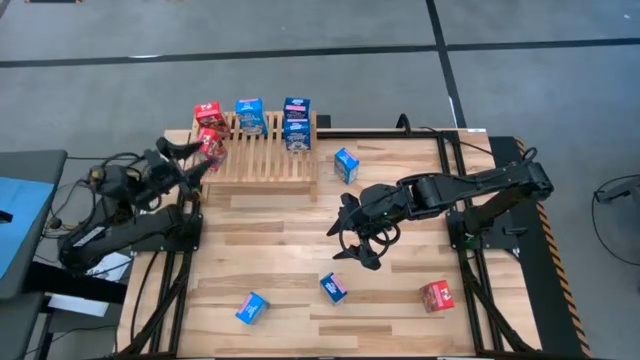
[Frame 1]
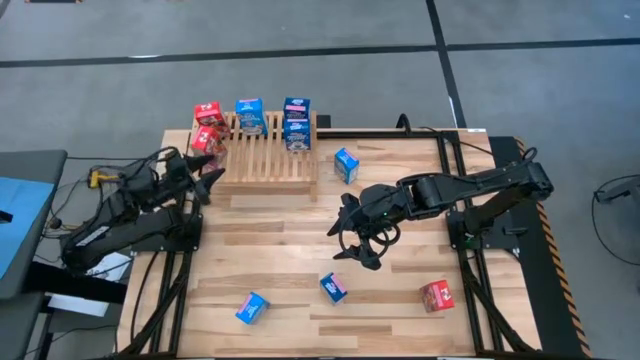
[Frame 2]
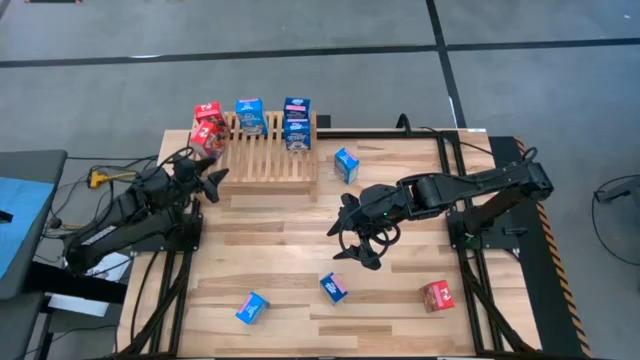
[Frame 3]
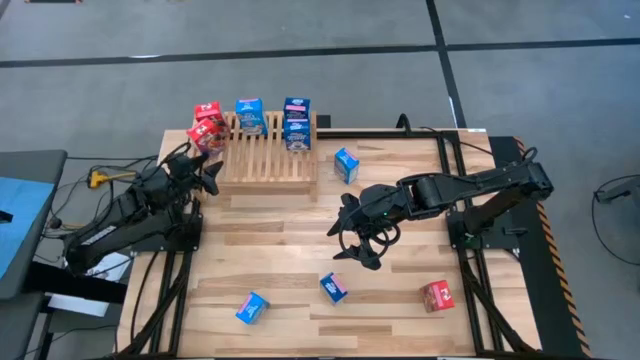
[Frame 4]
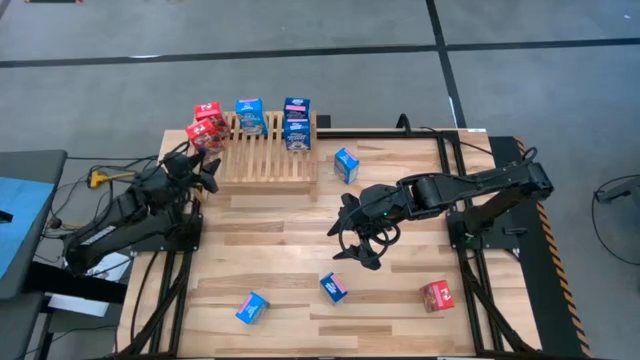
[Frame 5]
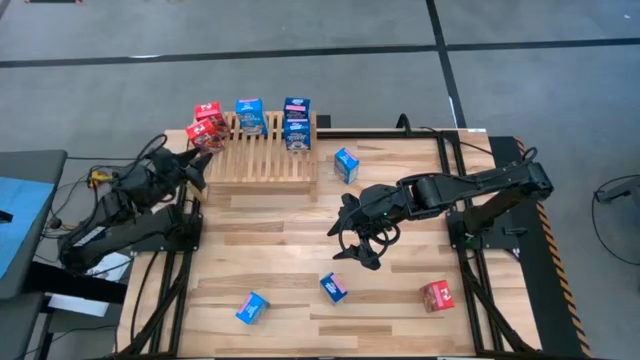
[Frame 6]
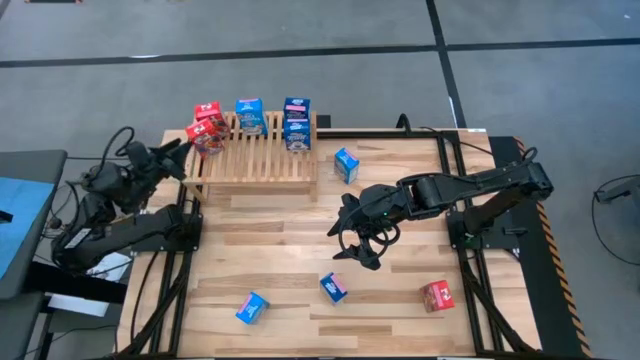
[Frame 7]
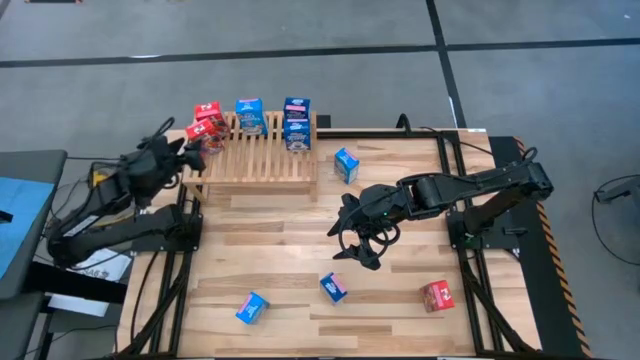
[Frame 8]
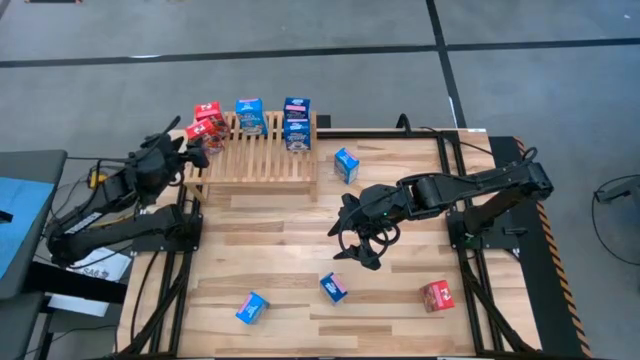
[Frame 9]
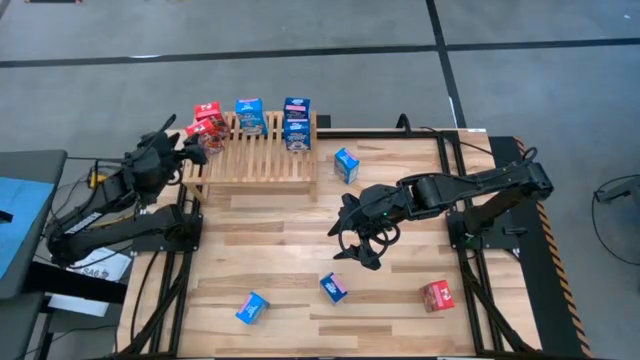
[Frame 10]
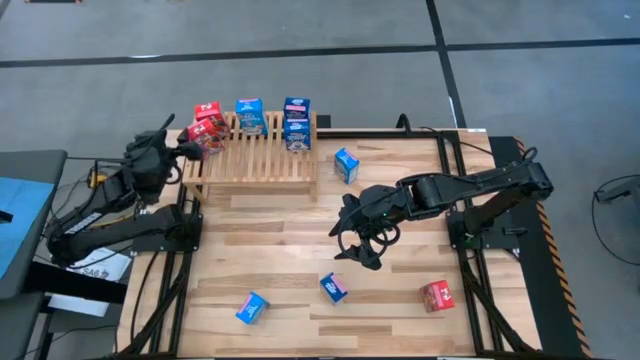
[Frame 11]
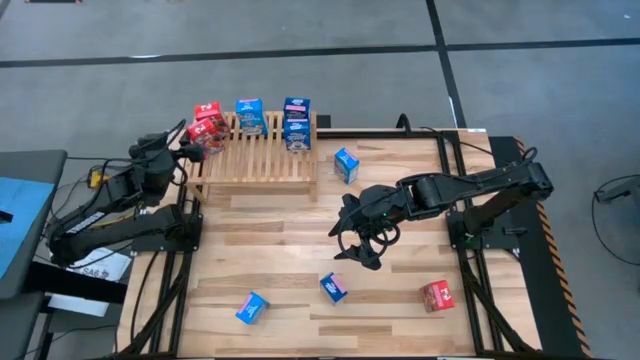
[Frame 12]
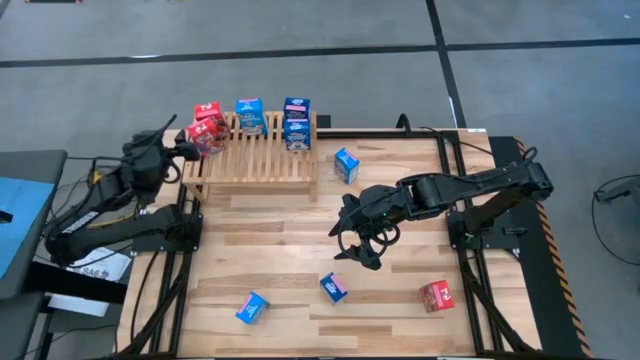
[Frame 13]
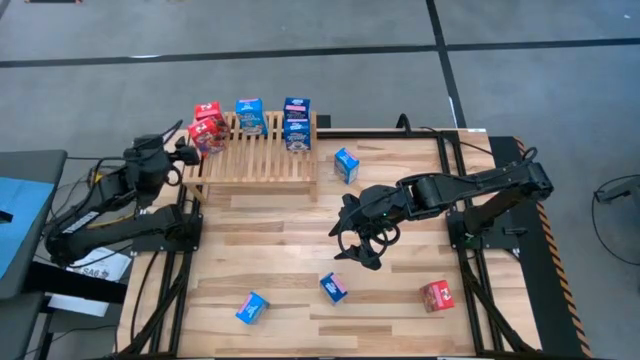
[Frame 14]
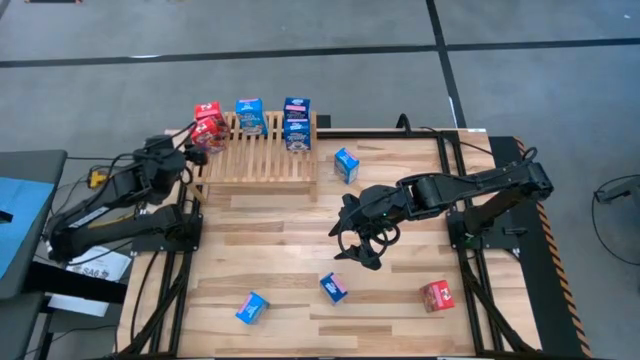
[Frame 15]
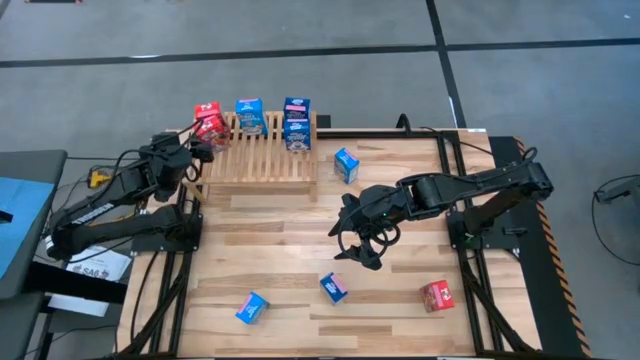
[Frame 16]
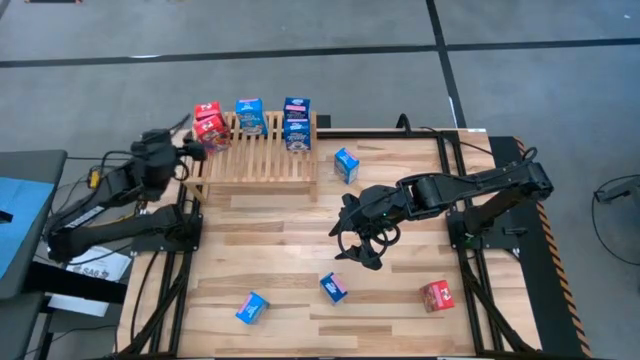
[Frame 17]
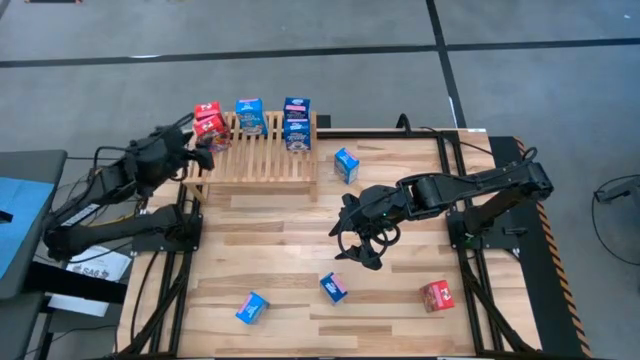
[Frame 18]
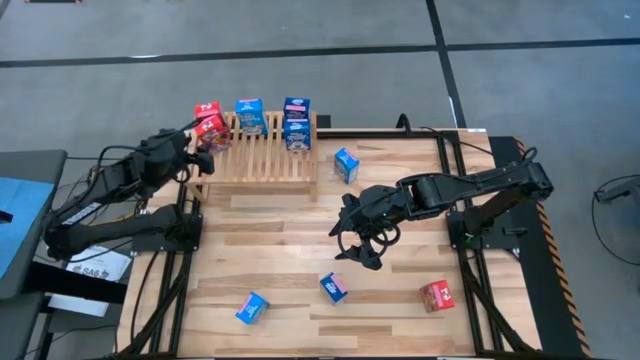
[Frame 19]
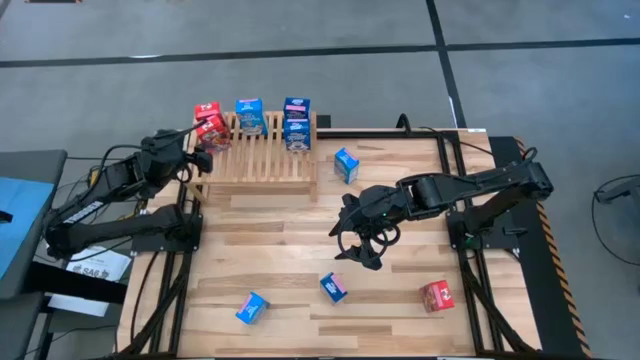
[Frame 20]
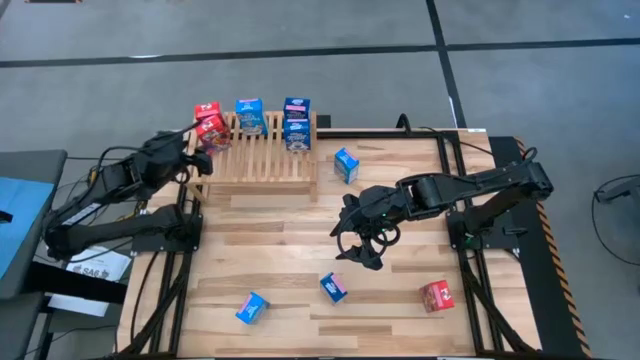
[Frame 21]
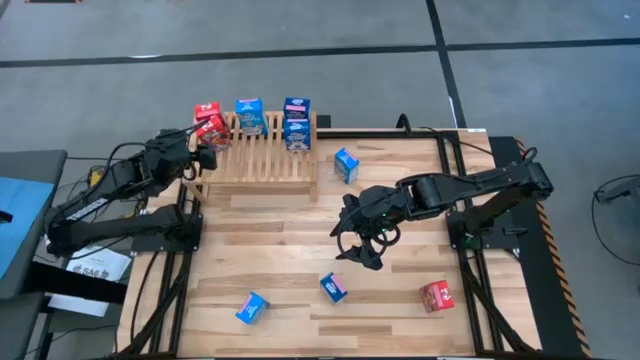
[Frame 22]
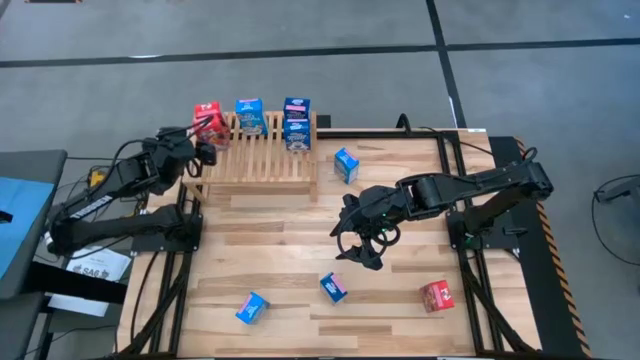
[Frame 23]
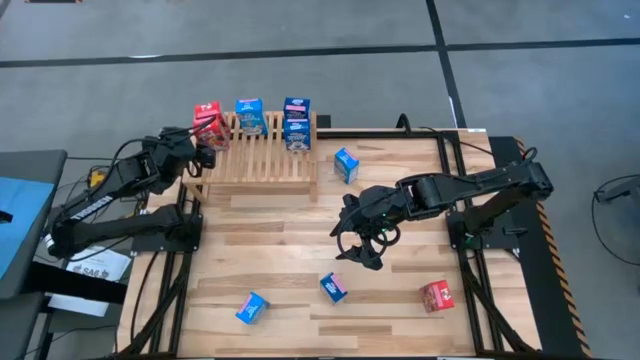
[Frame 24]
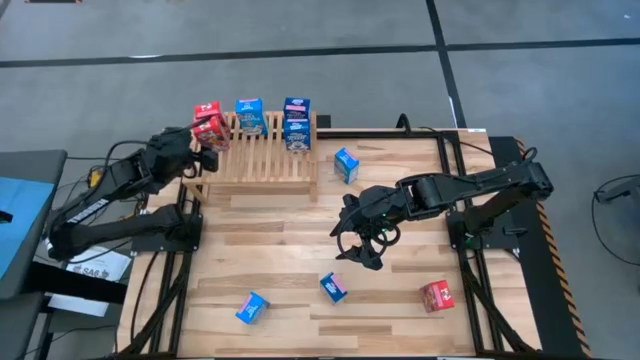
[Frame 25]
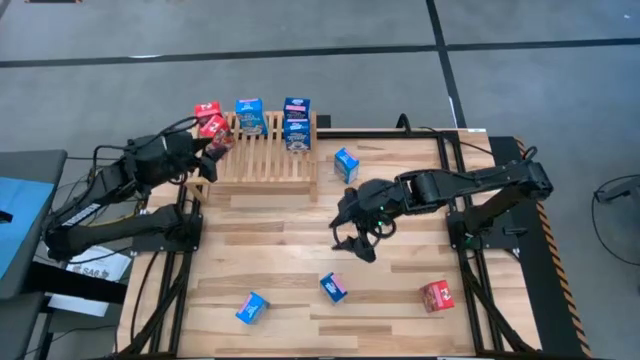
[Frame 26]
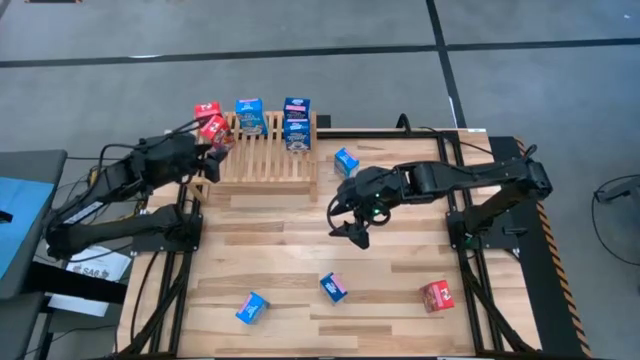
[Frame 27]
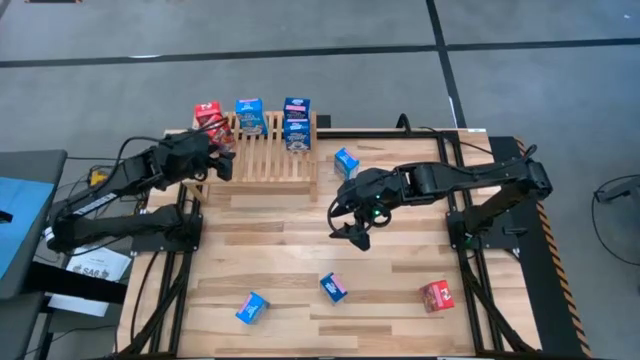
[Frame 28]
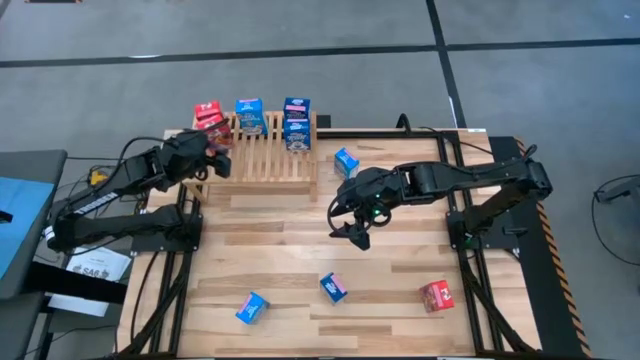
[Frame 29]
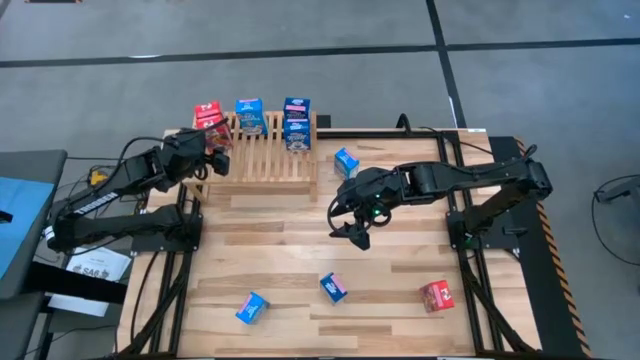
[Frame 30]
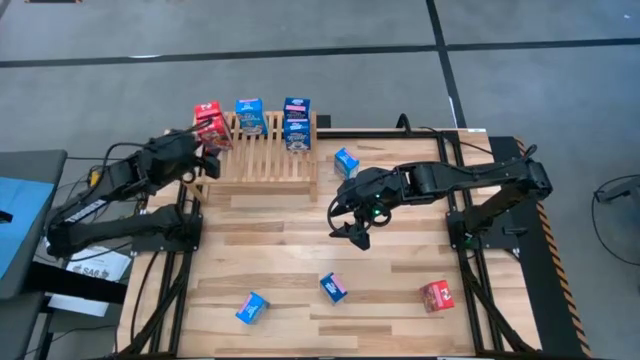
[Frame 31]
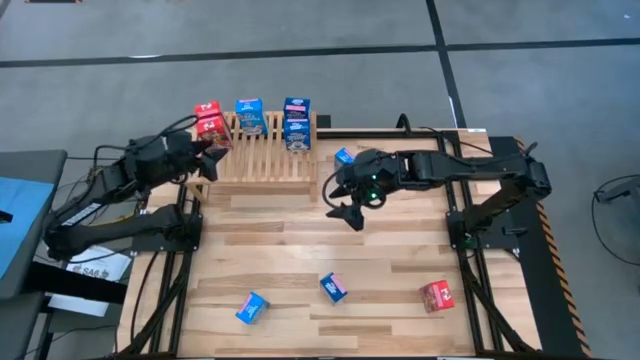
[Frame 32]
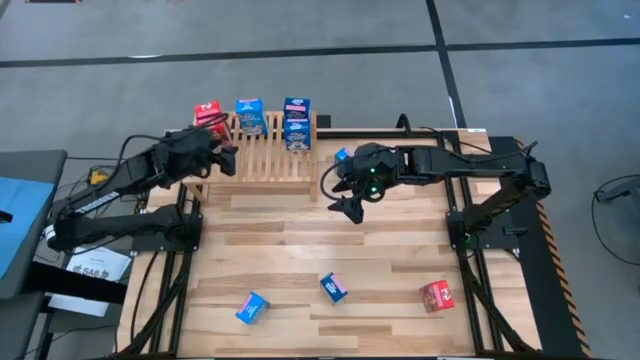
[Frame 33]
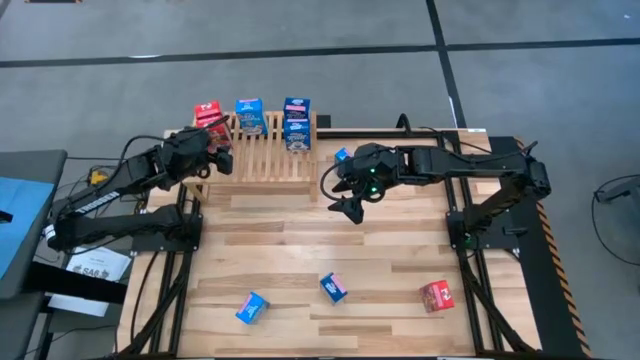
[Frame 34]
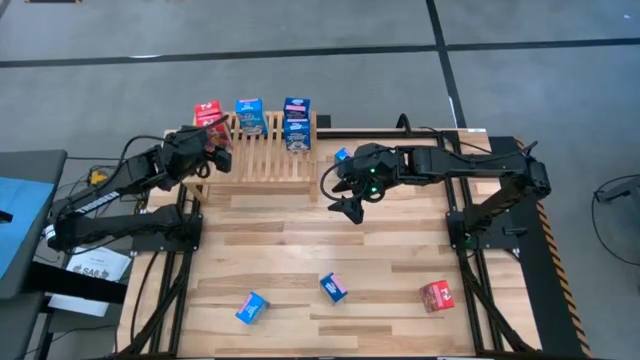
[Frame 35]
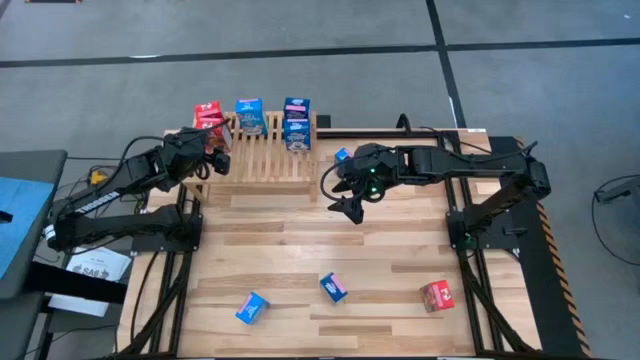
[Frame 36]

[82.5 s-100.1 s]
Task: Stack cereal on shelf
Put the top red cereal box the aligned with the other red cereal box on the shelf
